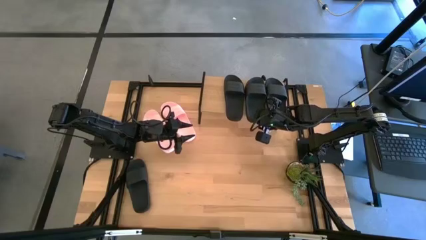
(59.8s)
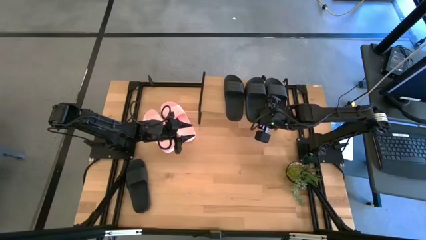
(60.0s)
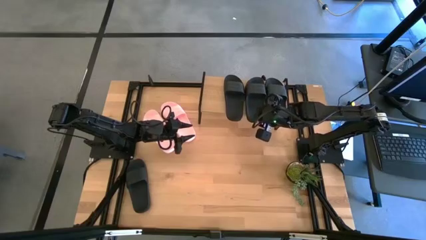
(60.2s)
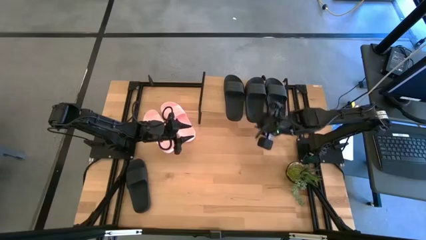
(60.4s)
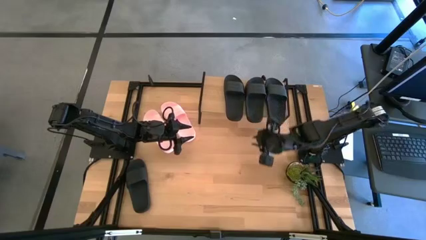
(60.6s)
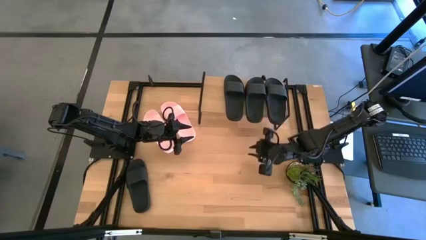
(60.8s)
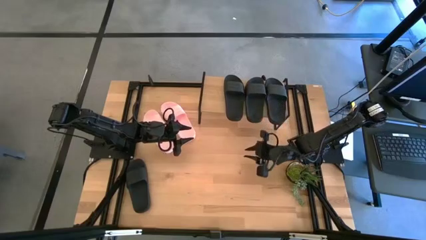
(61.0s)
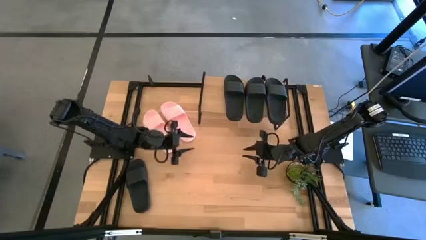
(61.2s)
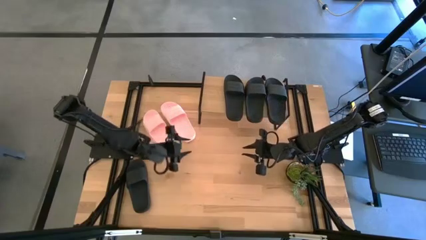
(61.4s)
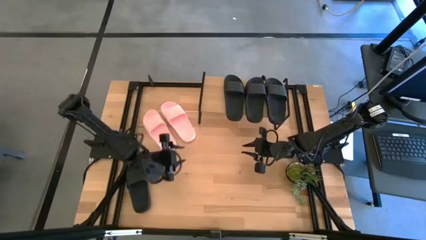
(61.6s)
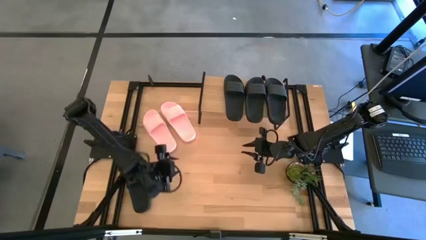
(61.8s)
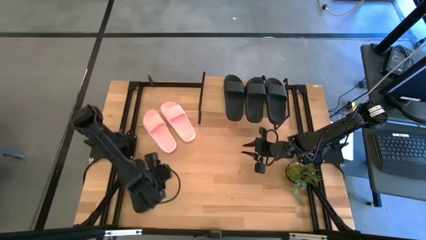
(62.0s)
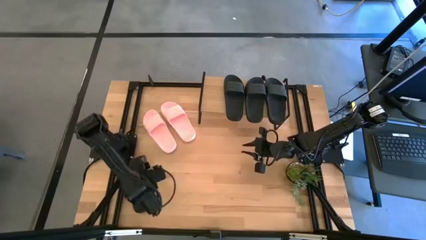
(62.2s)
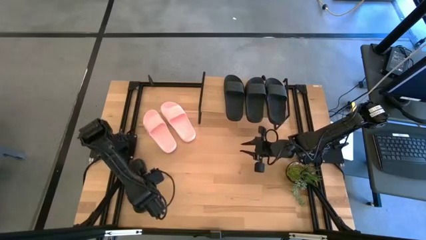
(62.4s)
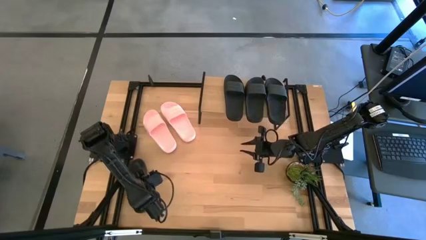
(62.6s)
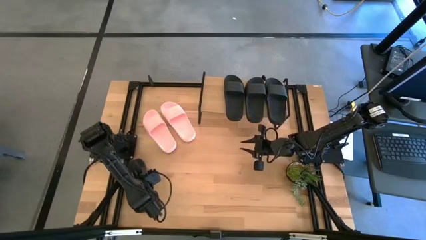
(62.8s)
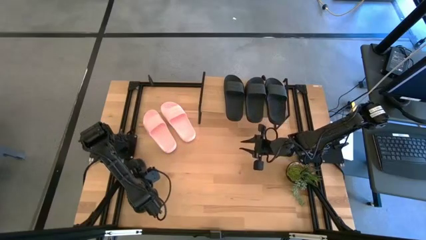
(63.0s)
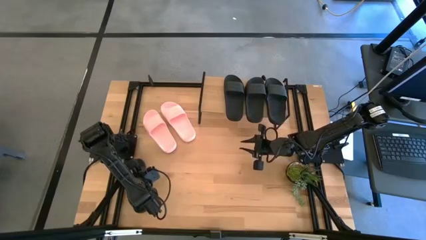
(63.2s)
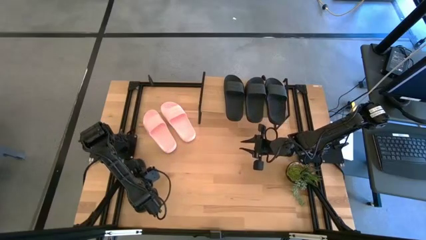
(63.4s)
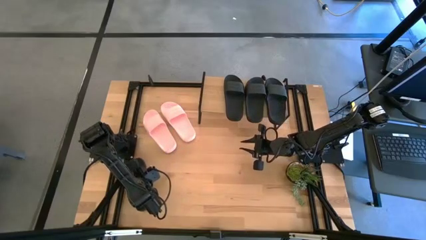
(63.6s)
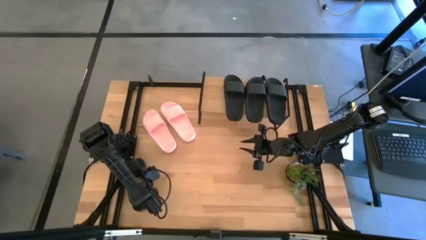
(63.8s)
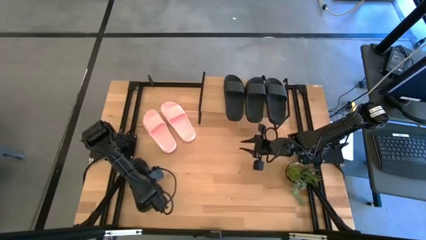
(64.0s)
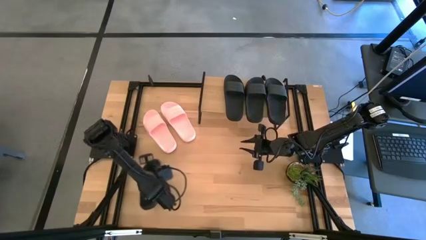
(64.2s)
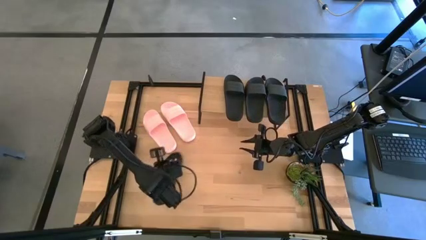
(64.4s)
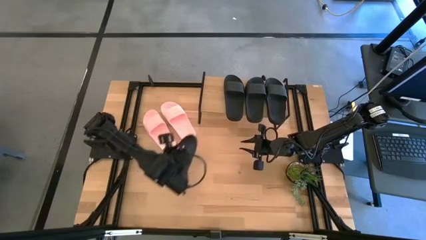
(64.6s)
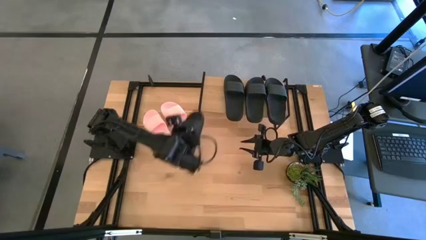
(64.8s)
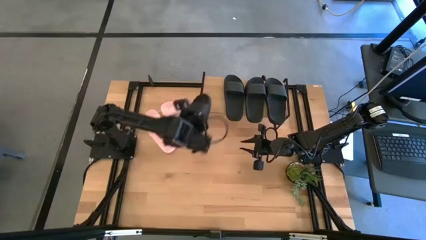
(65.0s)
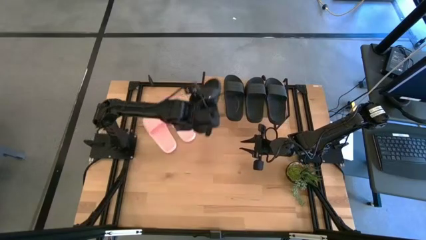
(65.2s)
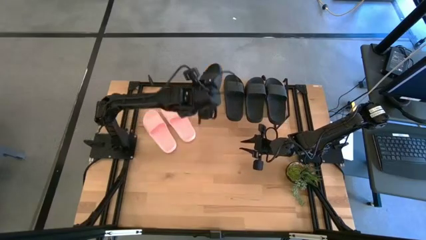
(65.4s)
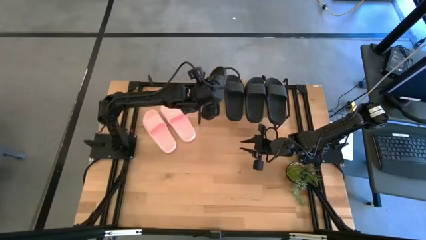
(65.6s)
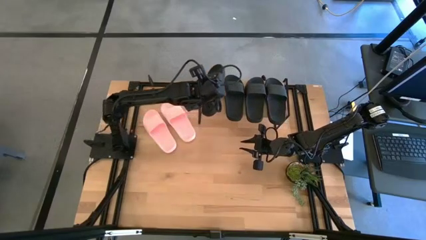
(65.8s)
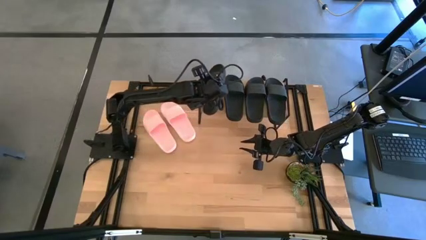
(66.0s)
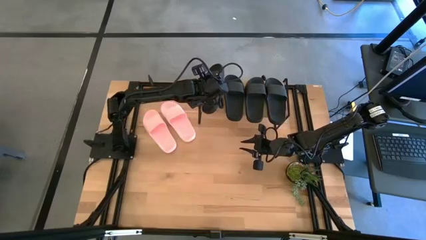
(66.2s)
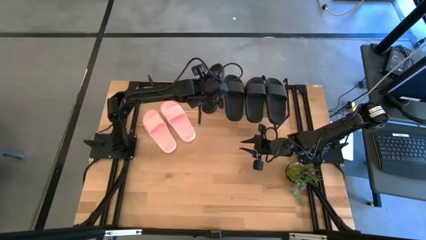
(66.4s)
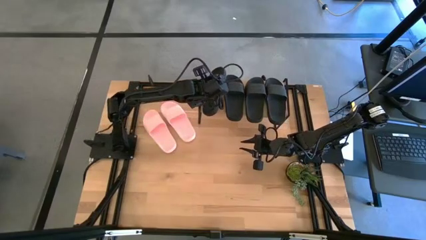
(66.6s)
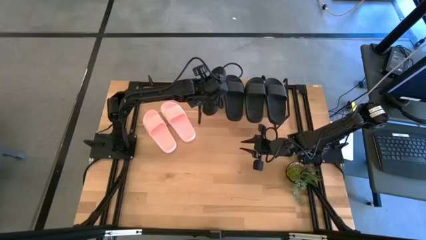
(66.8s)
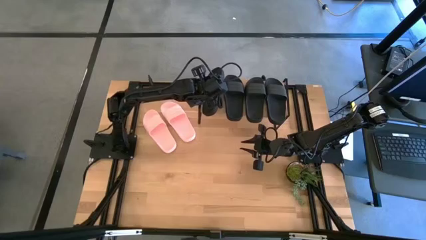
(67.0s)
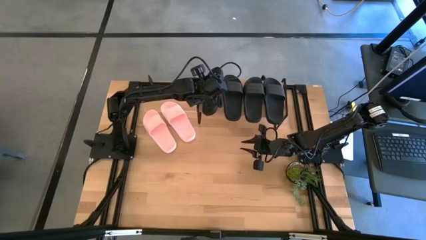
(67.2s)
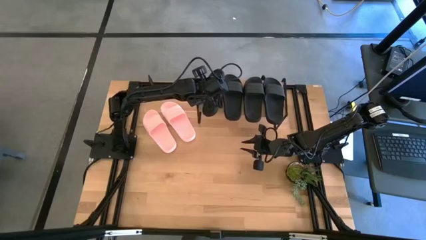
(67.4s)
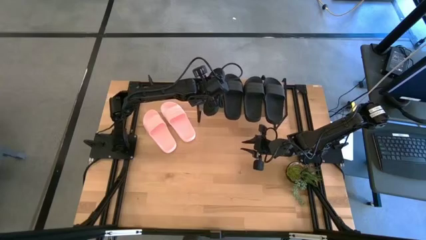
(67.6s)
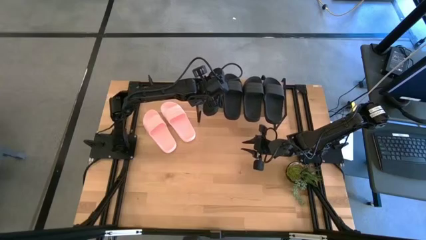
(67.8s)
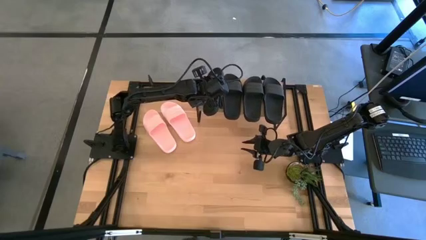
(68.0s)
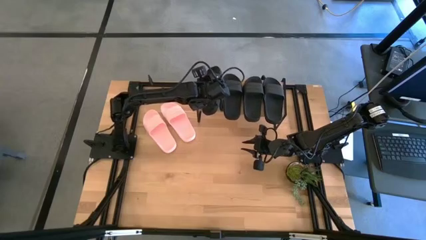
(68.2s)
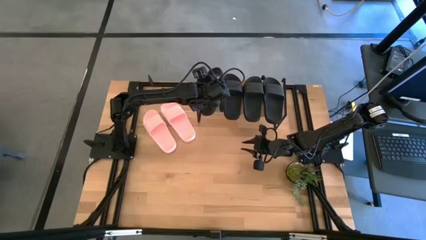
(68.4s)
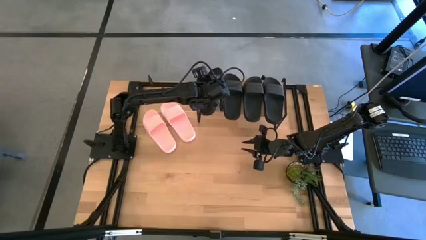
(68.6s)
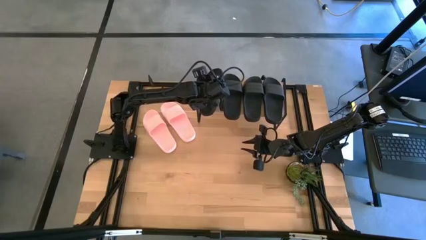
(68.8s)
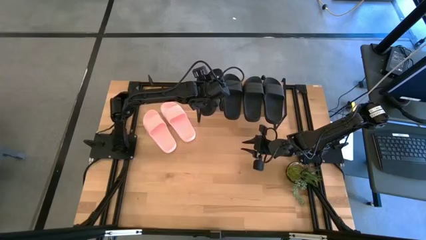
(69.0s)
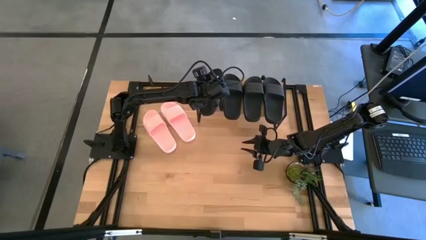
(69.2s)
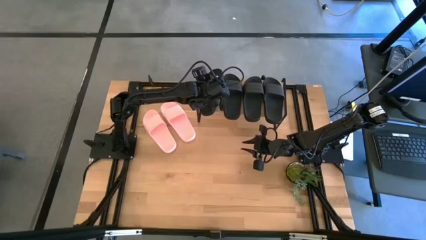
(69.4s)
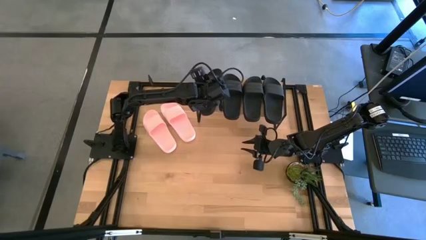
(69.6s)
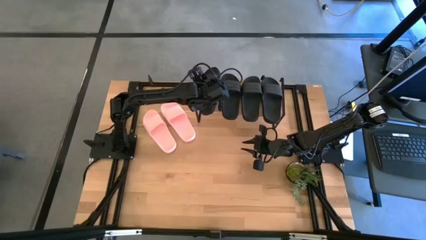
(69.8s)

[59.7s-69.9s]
Task: Pick and place slides into the shelf
Put the black slide on the shelf

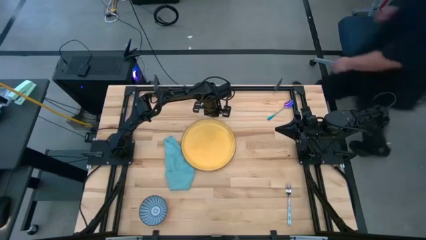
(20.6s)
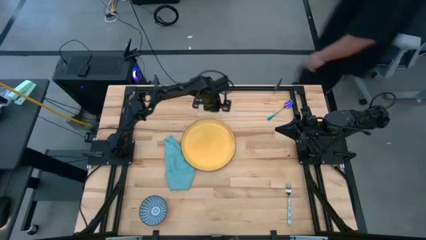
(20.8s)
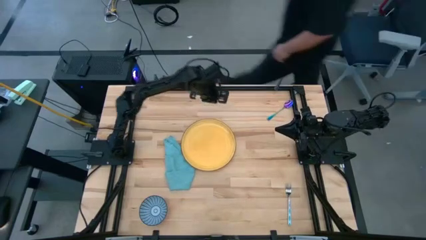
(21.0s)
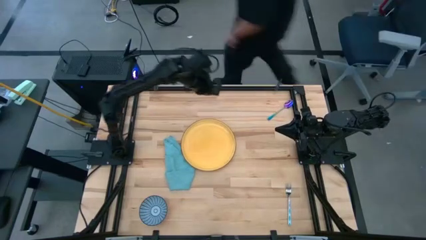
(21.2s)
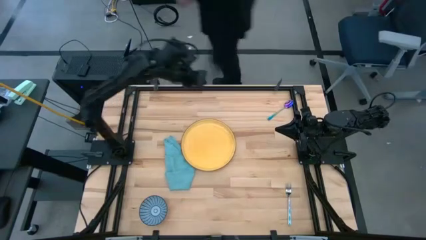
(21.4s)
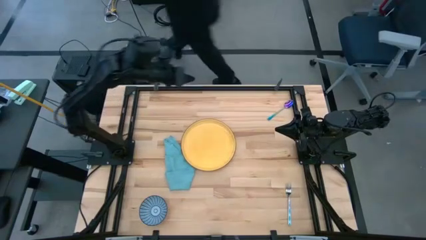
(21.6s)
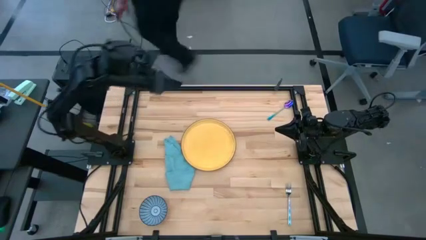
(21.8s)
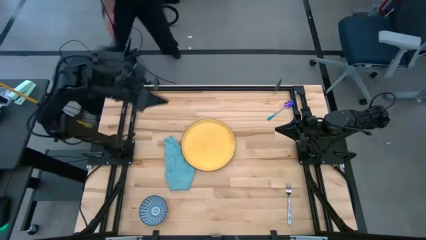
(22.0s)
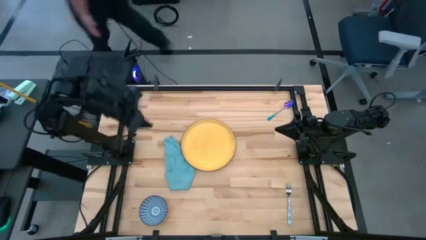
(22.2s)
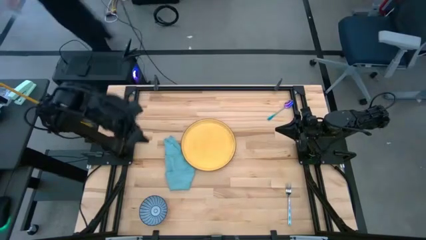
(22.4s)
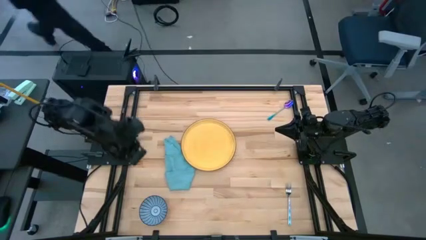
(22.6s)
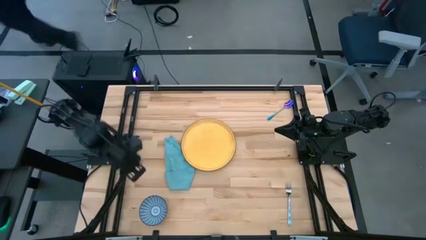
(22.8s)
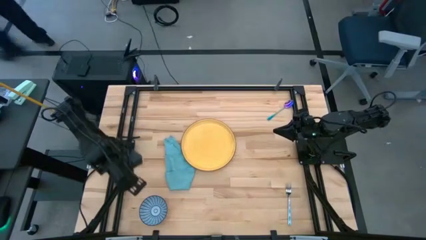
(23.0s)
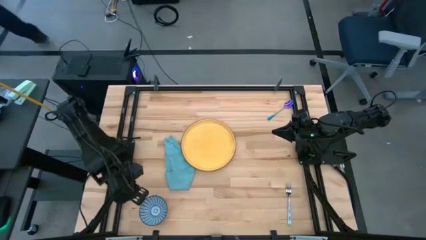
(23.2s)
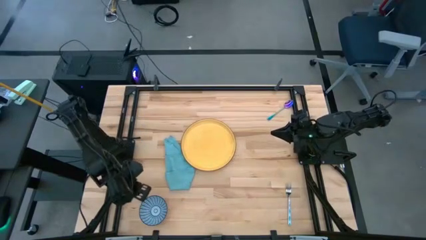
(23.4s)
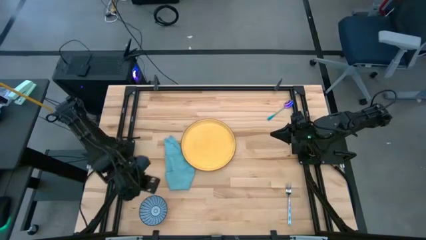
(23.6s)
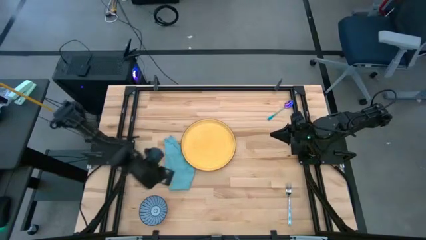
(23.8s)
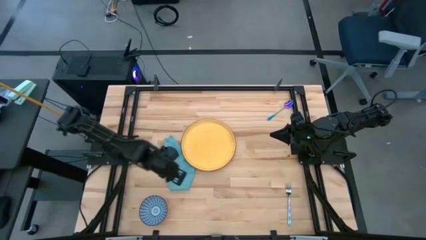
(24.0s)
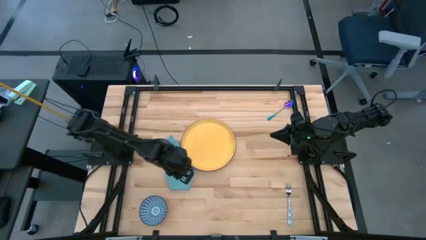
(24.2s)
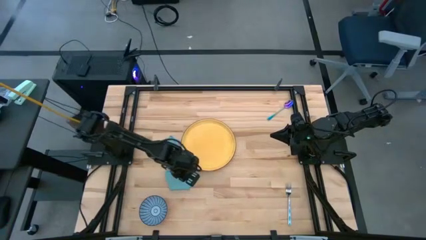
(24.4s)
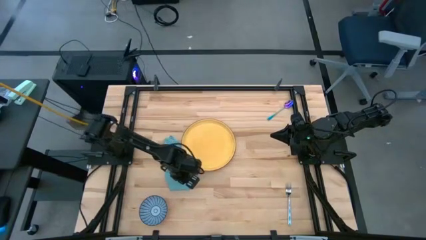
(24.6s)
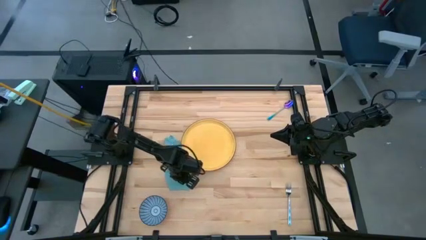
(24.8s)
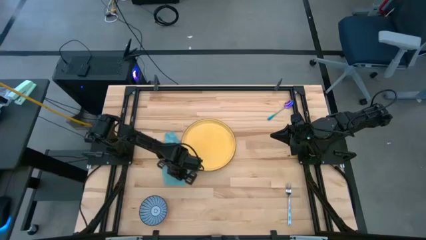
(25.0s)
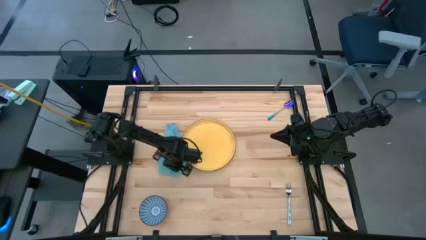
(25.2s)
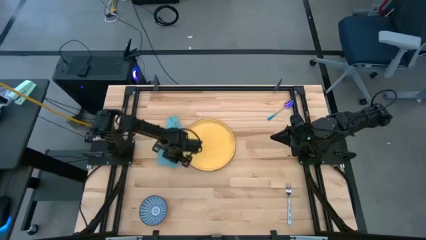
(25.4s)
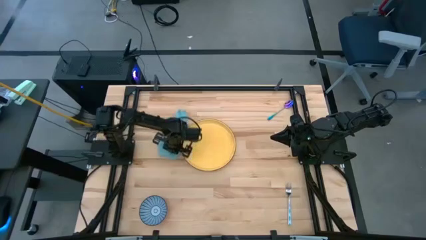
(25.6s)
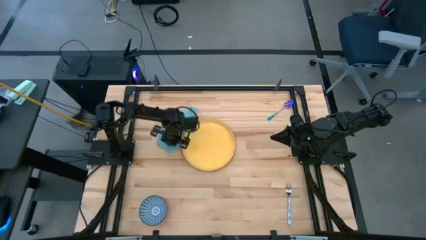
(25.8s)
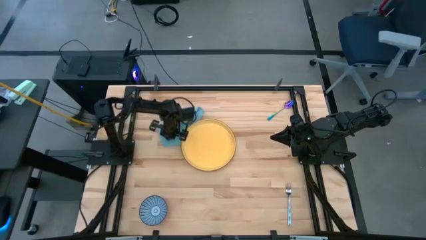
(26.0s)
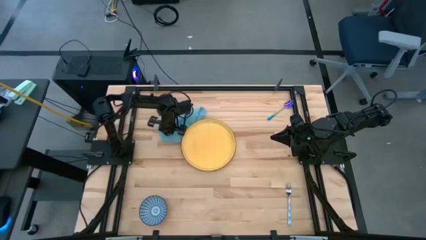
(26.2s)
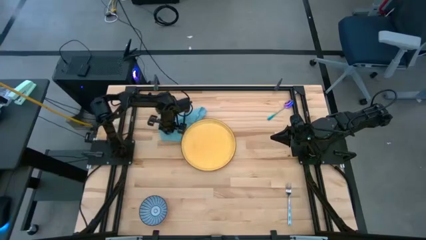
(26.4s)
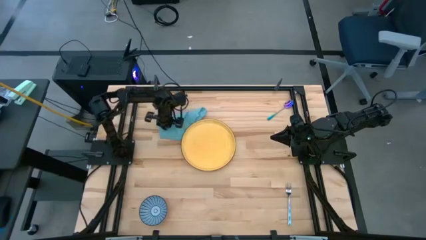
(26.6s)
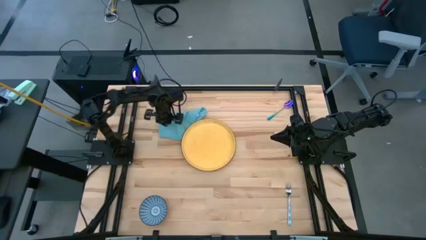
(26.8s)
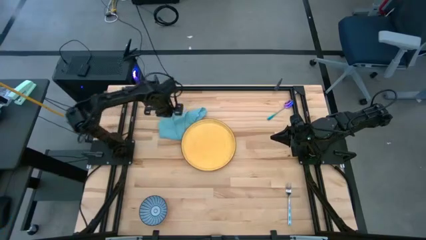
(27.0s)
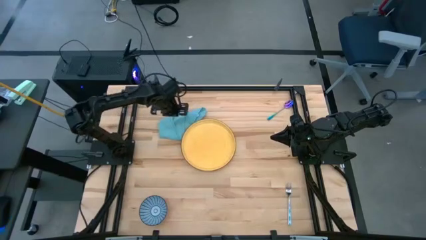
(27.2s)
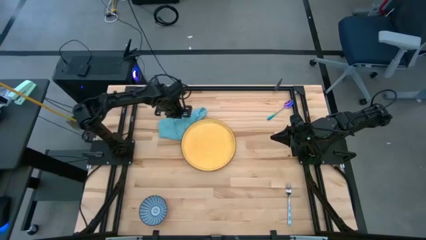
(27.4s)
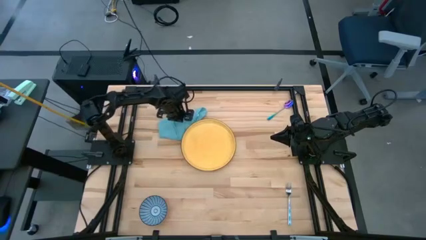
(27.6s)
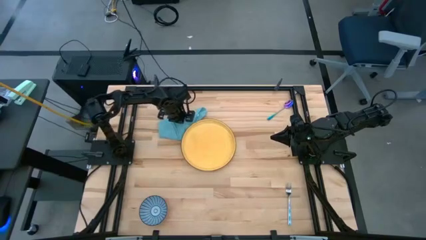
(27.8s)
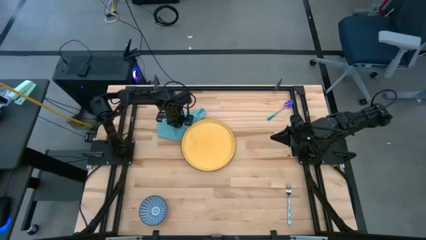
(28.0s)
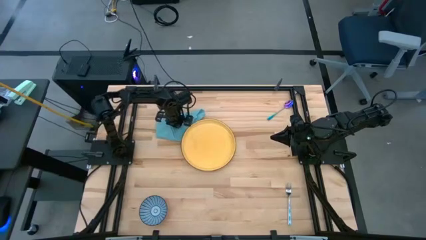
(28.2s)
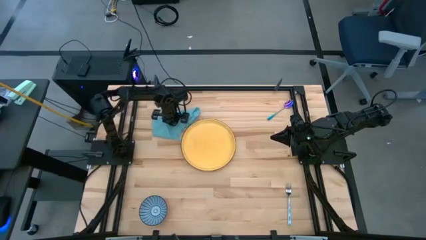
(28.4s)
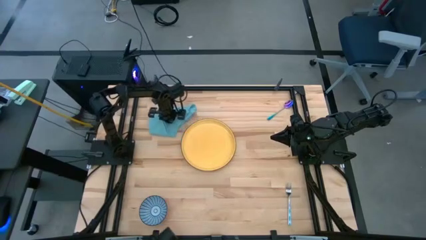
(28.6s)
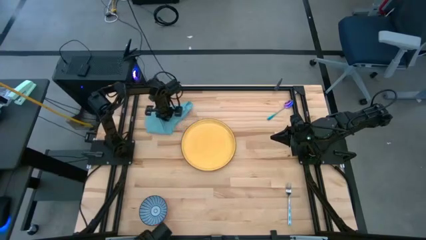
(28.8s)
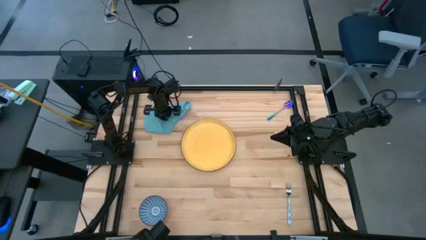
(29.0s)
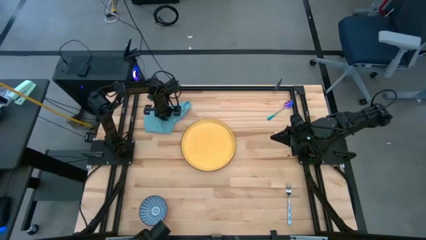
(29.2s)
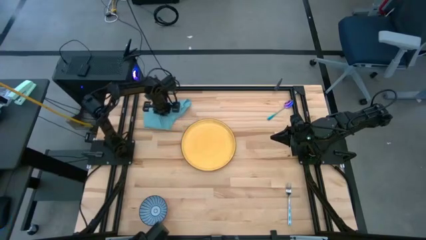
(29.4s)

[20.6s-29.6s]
Task: Set table place
Move the blue napkin to the top left of the table
